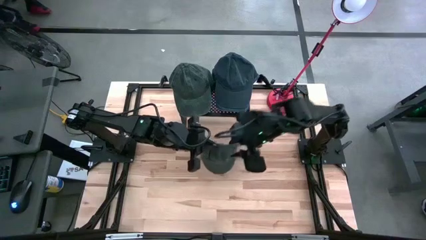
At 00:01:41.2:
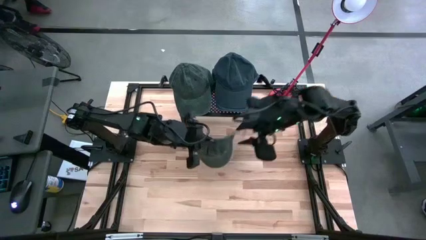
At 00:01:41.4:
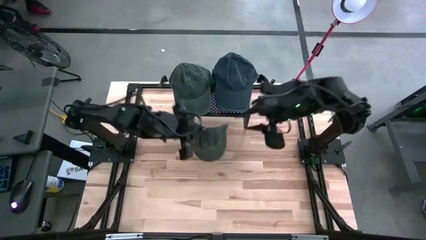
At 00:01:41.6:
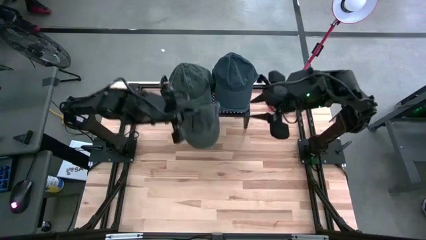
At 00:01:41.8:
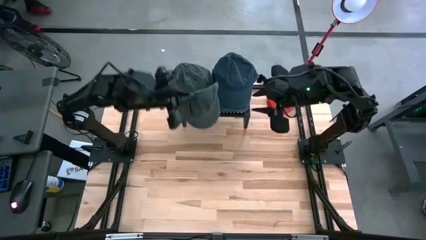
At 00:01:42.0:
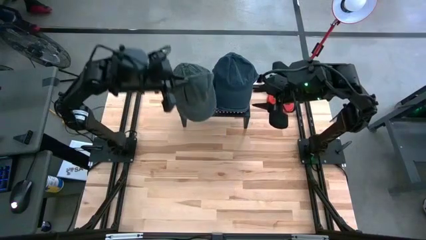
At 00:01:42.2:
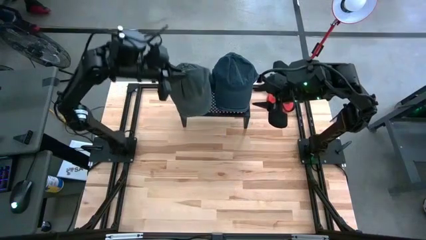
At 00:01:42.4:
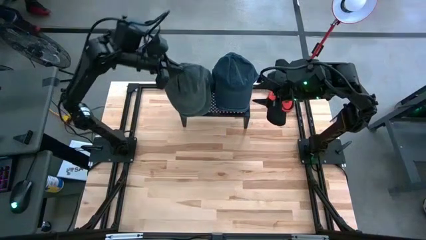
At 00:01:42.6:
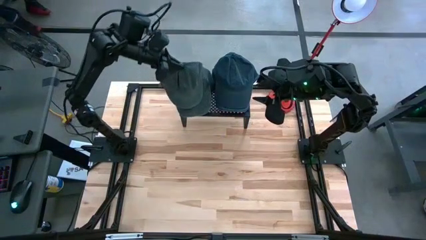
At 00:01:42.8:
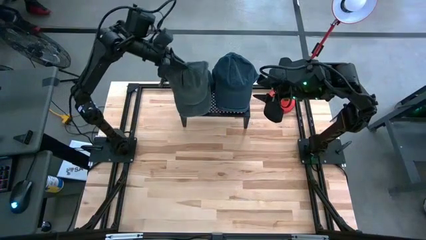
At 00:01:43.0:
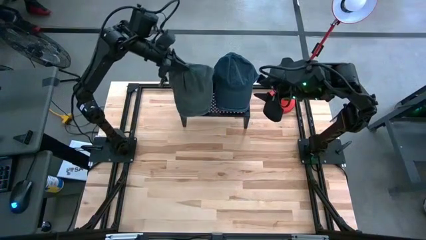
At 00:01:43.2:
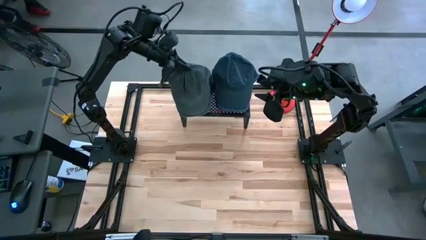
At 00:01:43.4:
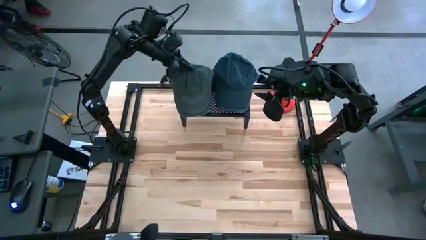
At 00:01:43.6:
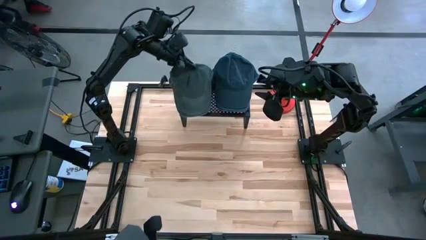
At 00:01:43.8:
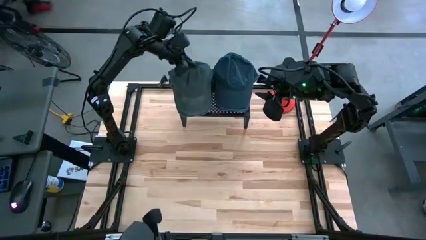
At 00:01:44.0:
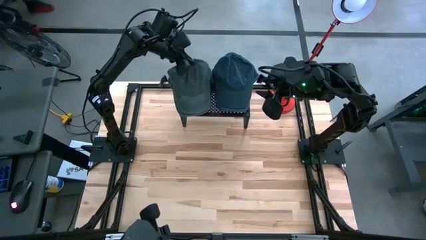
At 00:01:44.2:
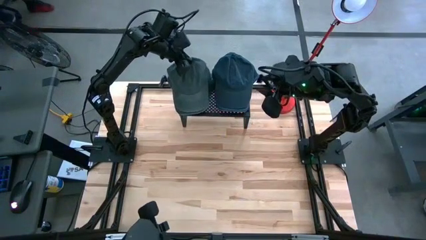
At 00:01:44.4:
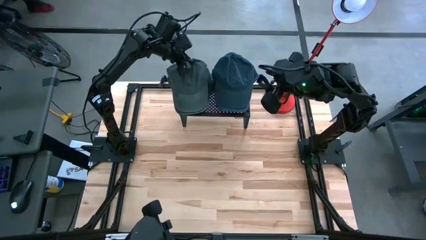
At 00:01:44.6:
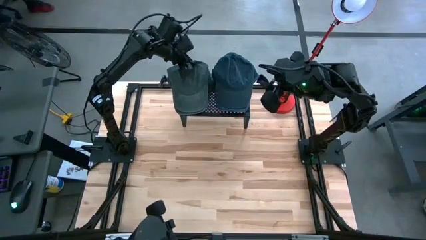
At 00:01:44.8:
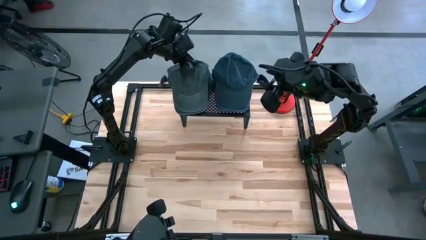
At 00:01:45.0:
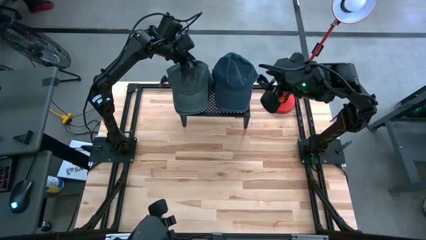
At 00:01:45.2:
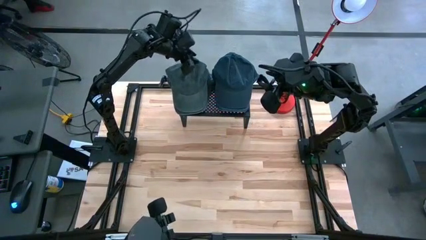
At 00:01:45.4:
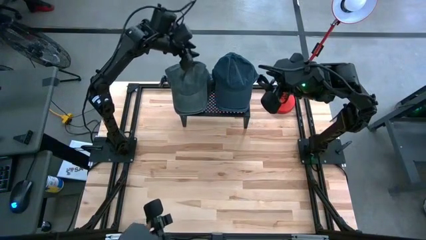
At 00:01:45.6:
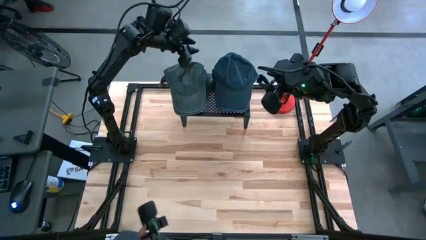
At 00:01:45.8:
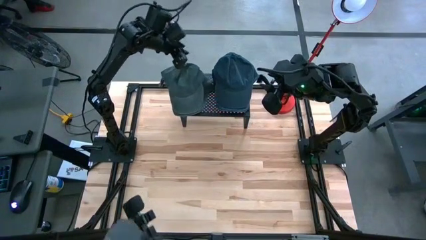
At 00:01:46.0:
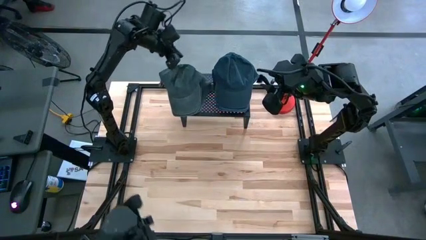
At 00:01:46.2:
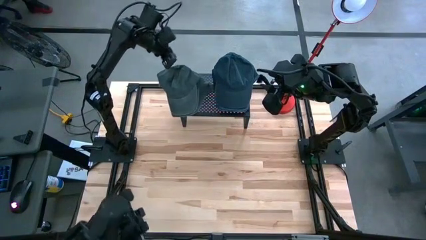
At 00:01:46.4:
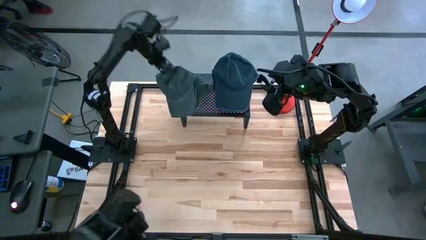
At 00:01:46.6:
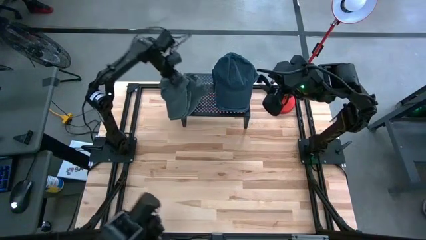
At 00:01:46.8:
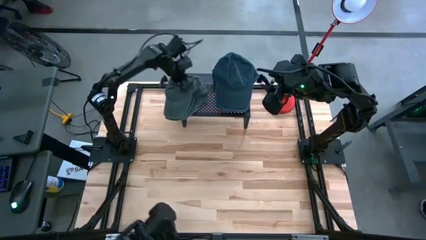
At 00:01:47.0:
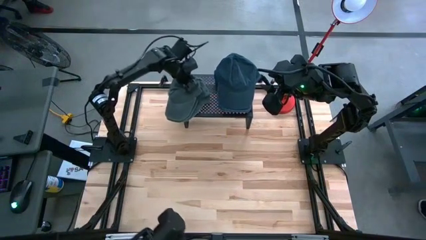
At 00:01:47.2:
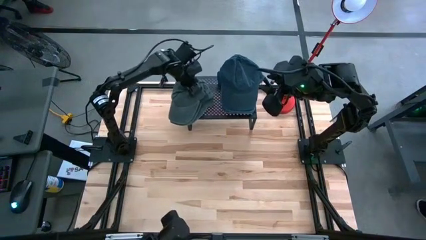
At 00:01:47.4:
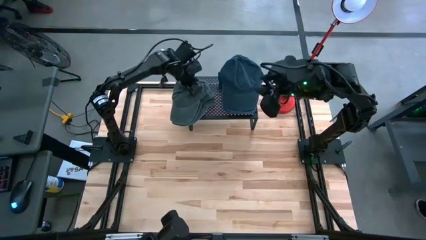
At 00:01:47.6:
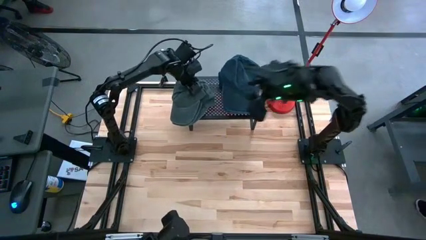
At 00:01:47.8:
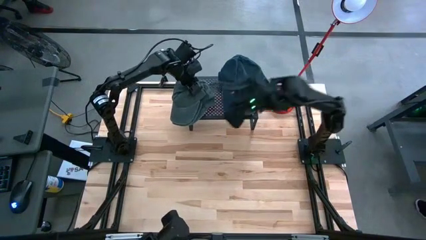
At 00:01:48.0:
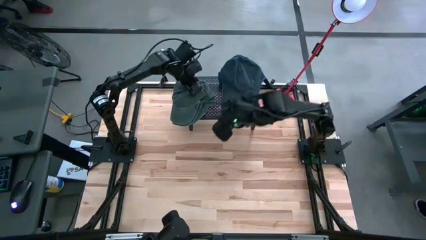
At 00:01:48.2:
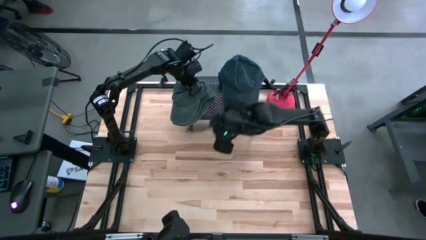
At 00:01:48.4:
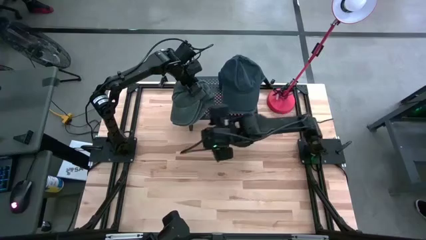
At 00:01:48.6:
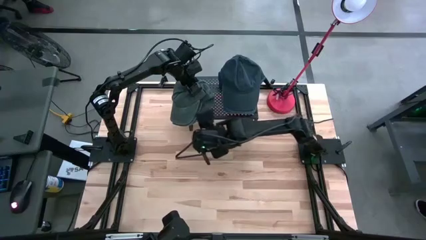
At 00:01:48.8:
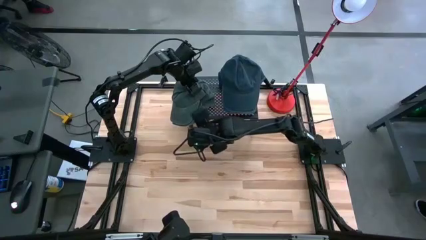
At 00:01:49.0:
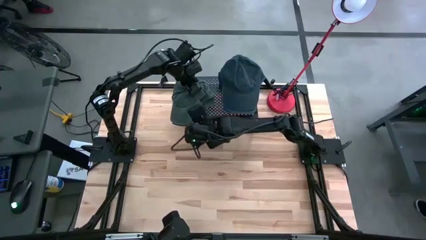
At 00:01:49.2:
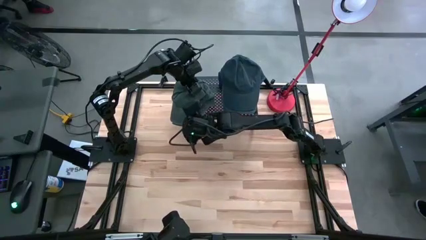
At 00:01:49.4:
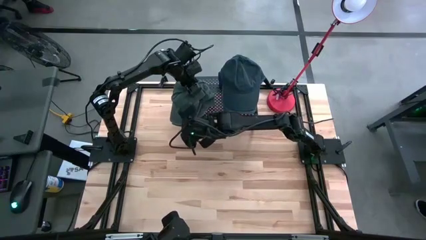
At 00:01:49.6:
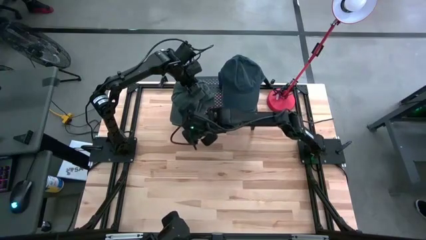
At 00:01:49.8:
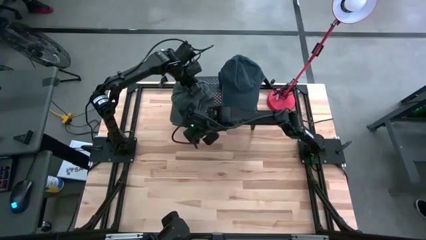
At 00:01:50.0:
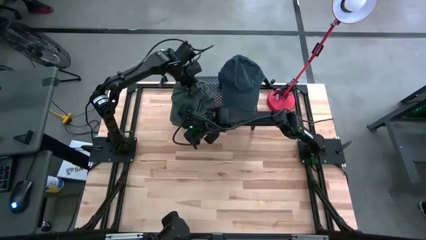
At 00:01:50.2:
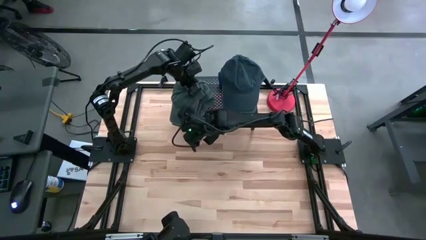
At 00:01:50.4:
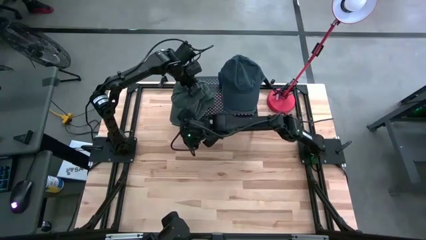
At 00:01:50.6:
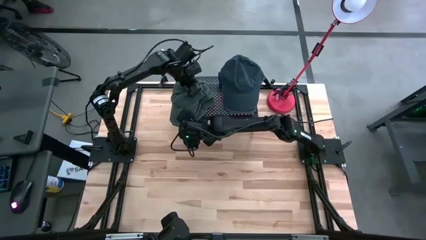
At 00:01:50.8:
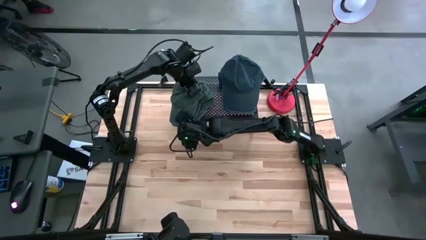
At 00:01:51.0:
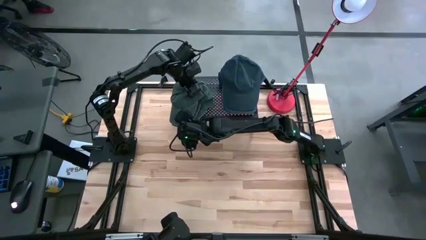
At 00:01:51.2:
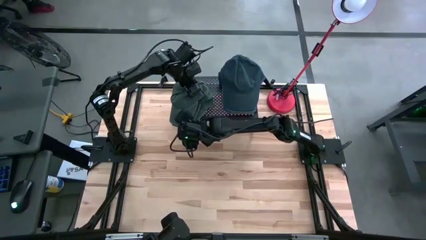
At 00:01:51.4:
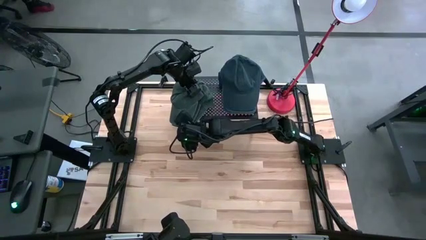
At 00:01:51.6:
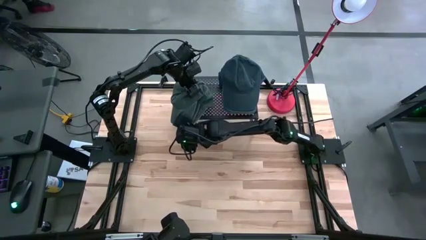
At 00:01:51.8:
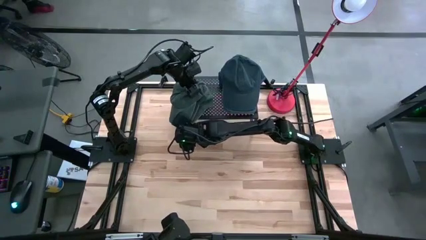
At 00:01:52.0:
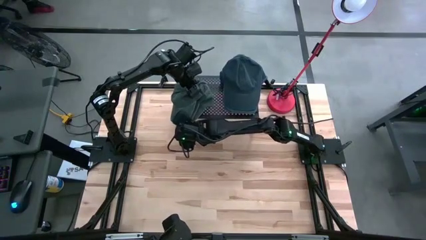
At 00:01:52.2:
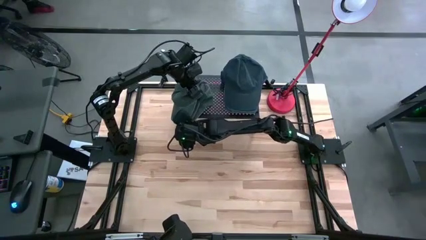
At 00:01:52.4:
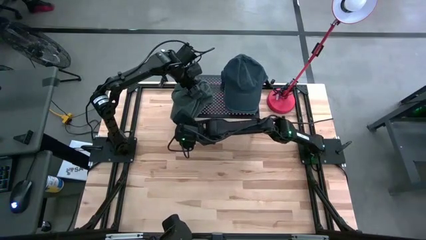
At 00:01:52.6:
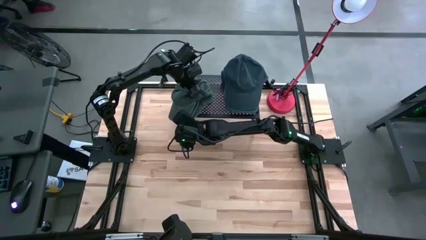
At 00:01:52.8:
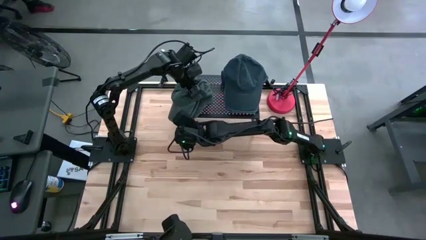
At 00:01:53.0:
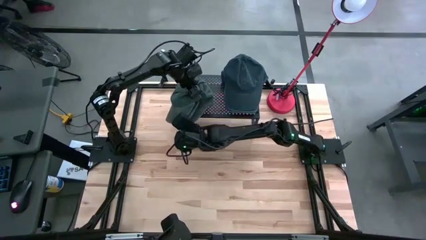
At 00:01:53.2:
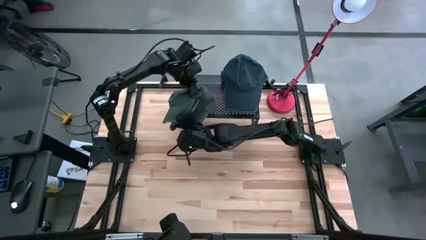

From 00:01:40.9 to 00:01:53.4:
Task: Pick & Place hat
Stack the dark green cap on top of the other dark green caps on the shelf
